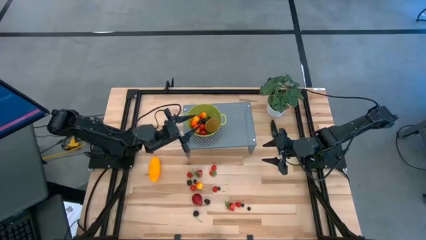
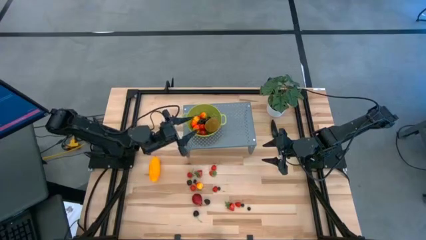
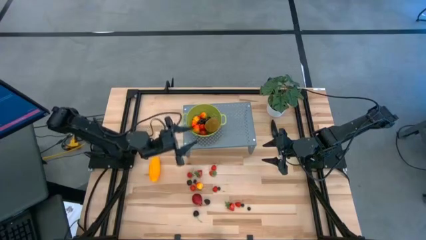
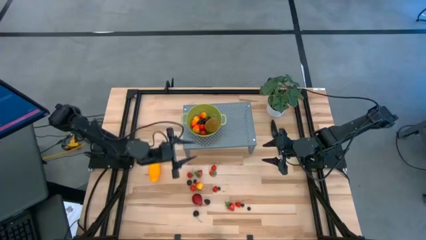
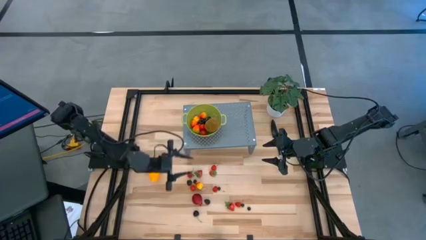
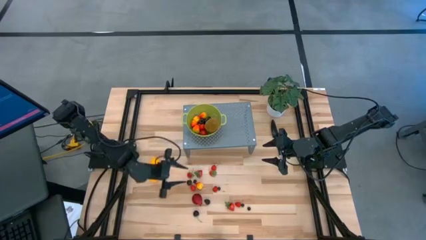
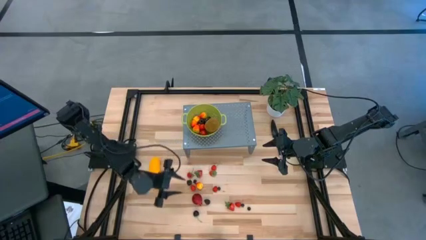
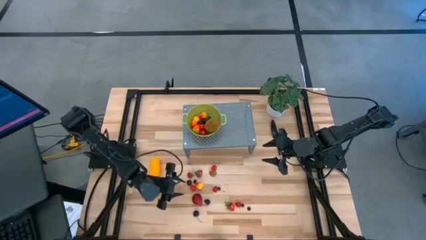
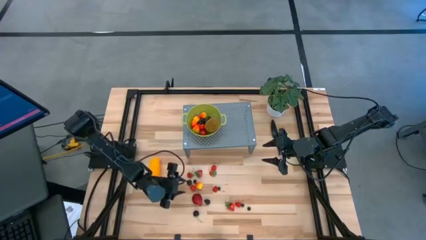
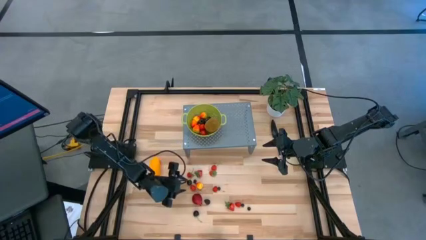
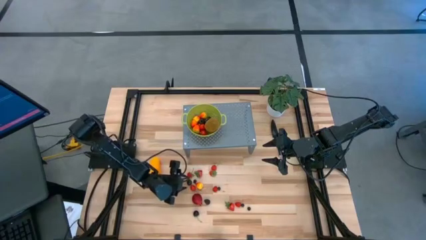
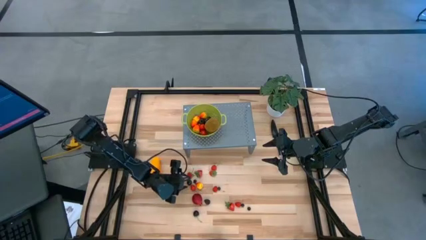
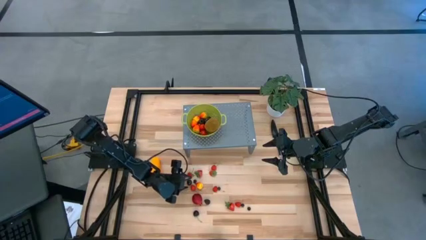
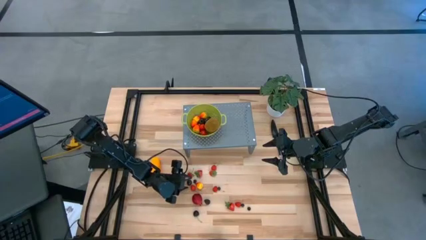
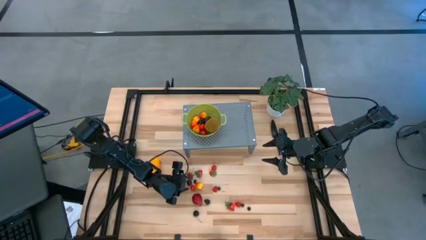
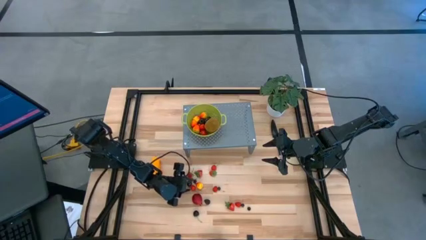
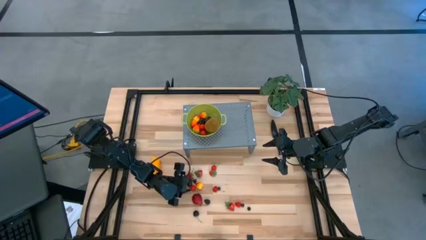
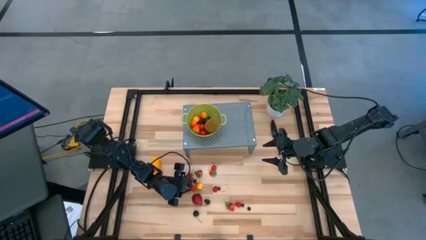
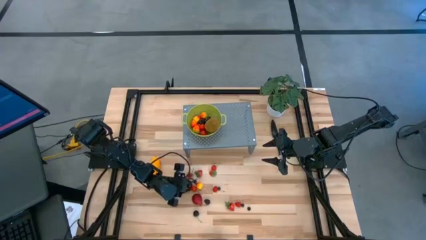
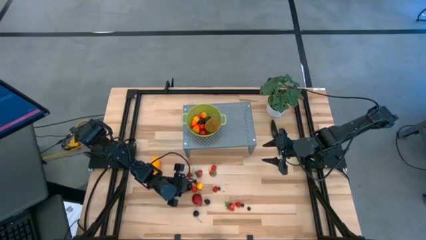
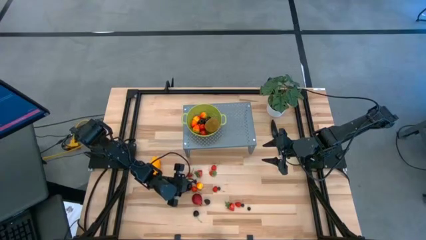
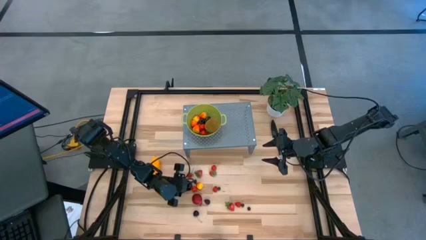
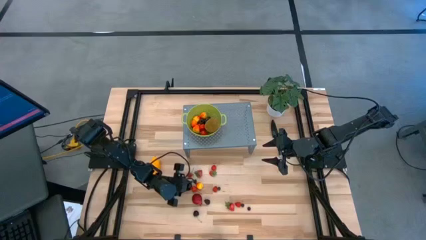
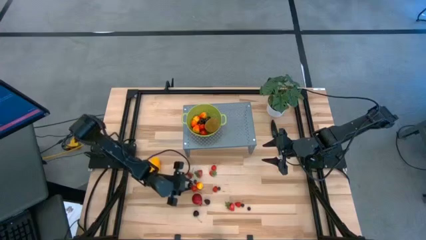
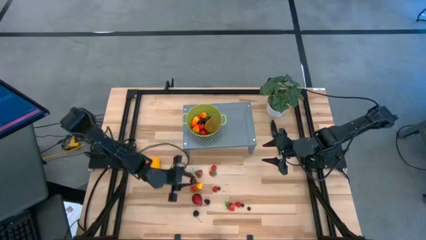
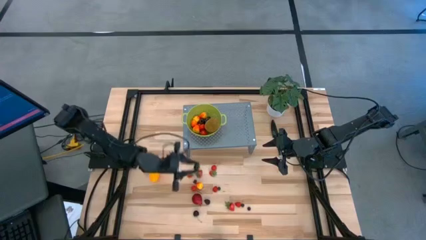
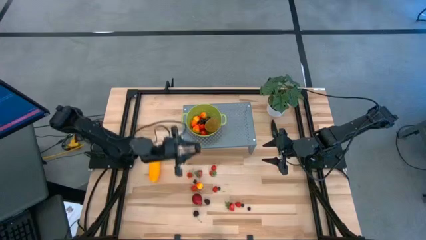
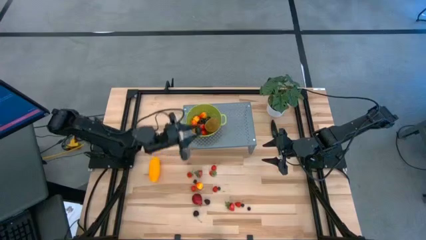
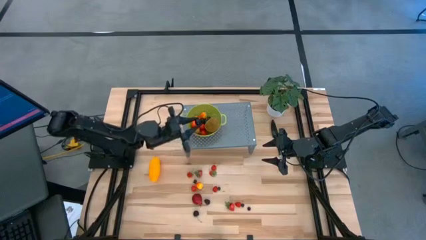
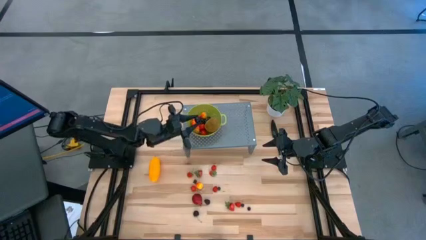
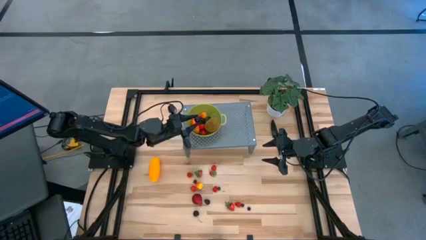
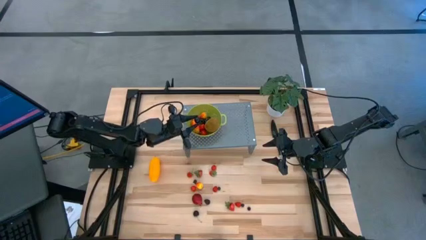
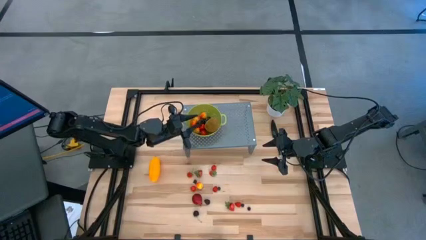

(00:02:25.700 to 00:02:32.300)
Task: Pick & Place Fruit
Put the black cherry into the green strainer bowl on the shelf

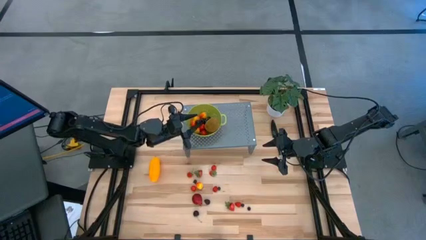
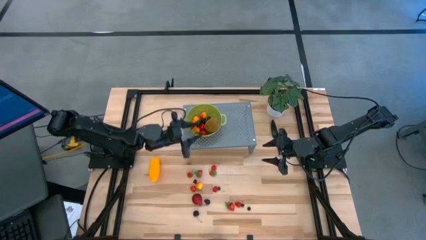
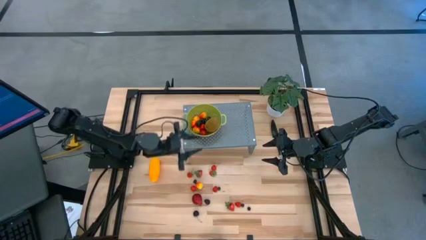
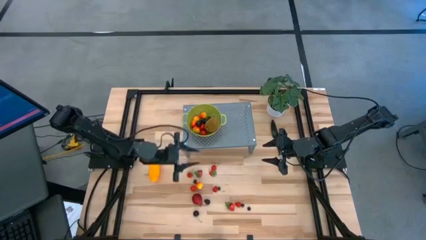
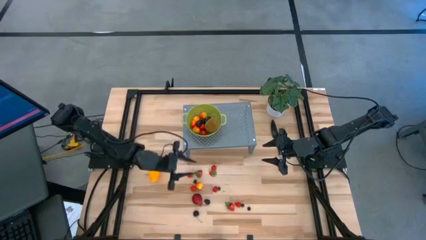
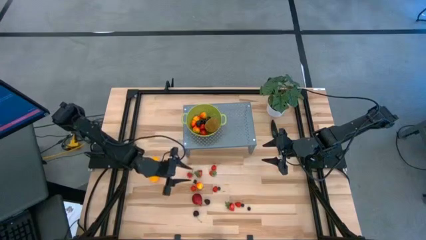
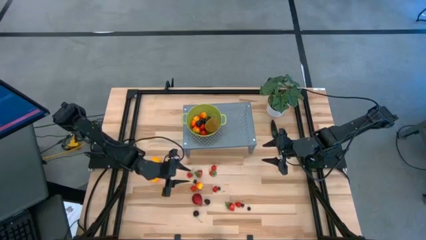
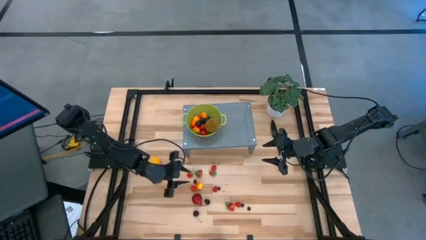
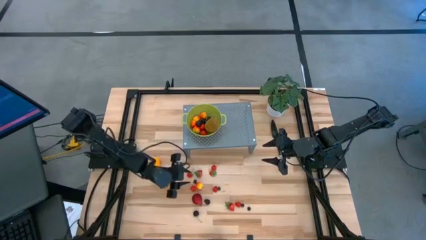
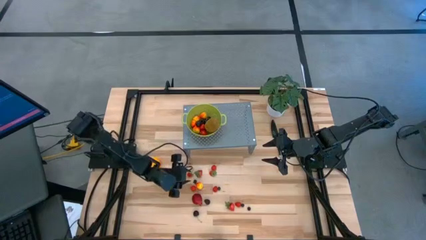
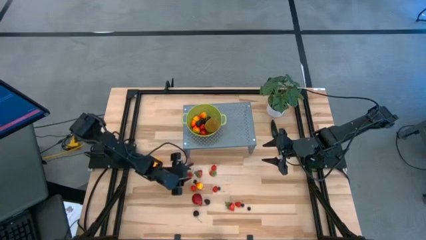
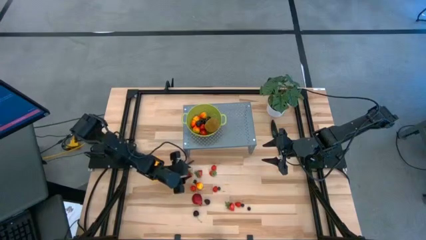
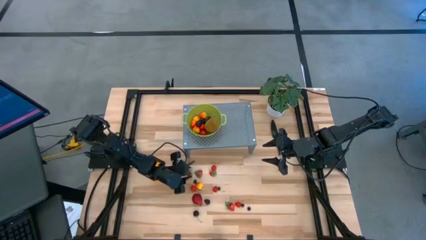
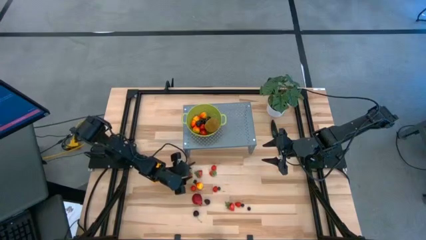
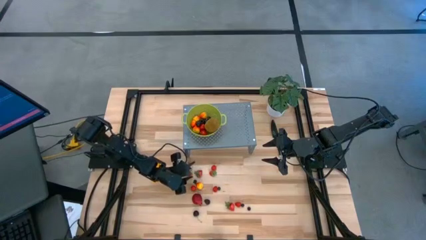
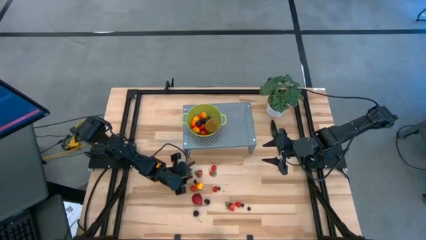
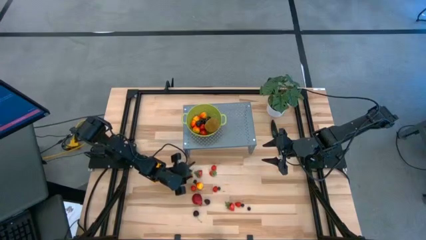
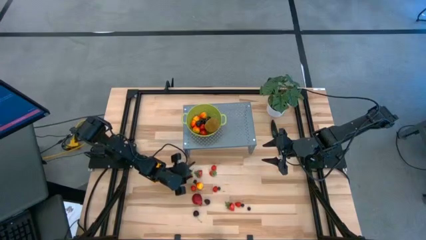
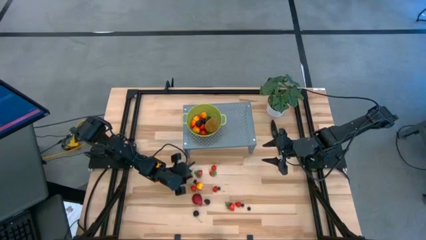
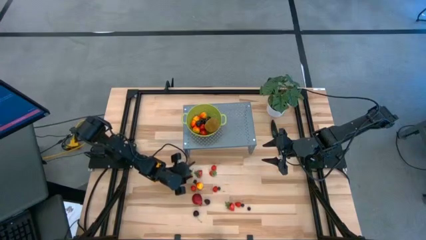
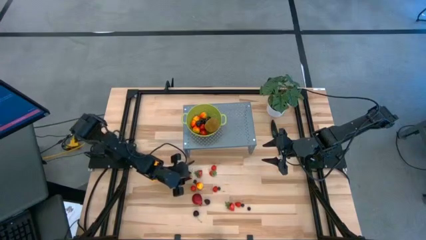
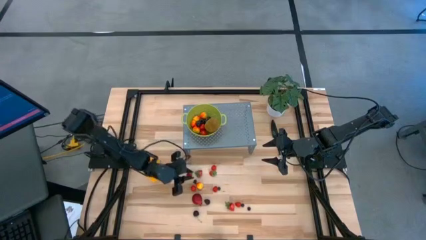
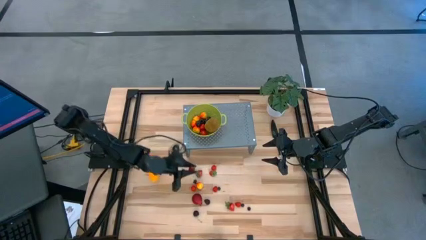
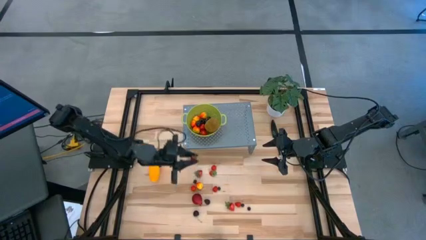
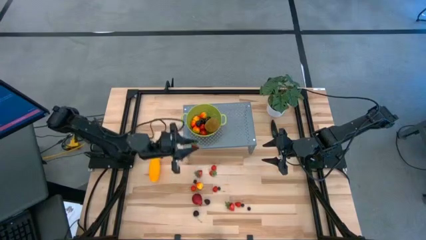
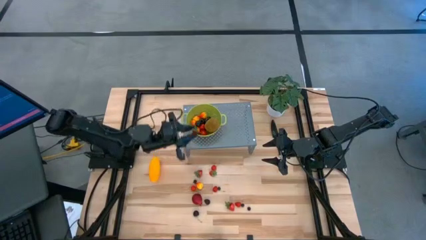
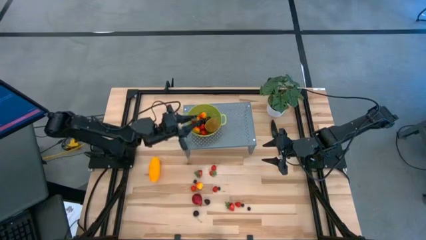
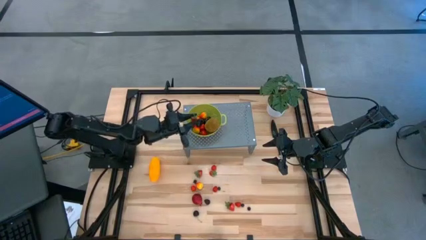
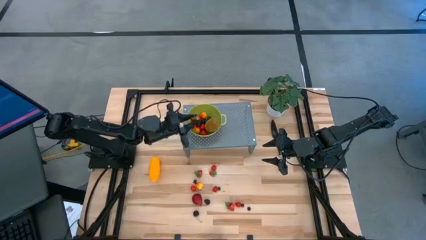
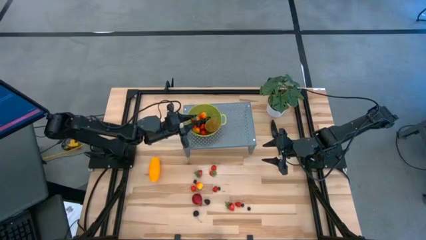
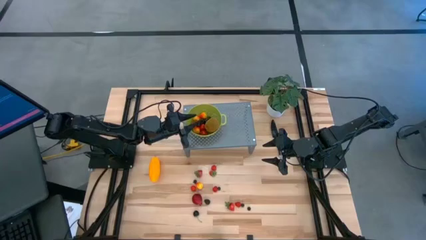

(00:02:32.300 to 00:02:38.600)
Put the strawberry into the green strainer bowl on the shelf

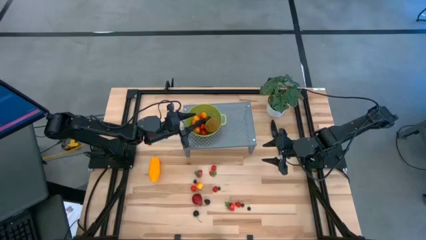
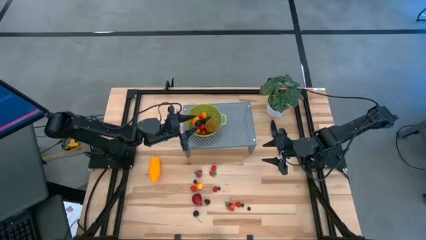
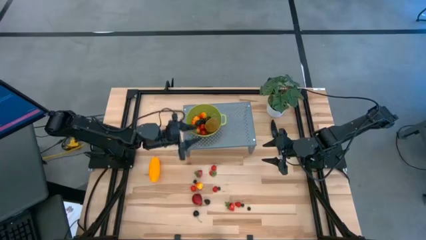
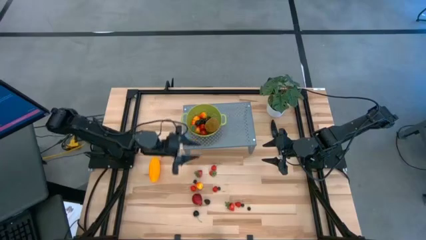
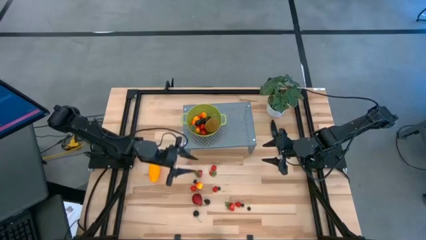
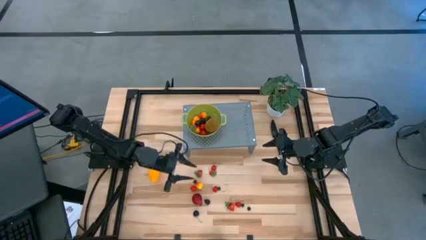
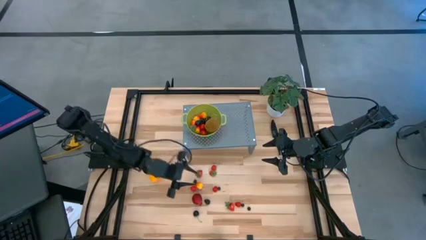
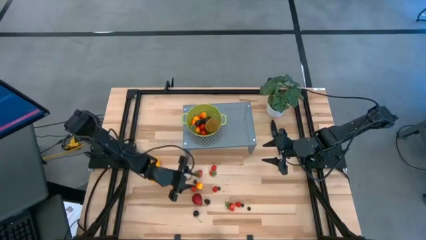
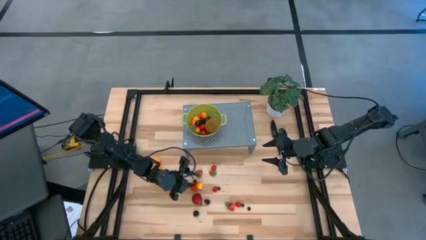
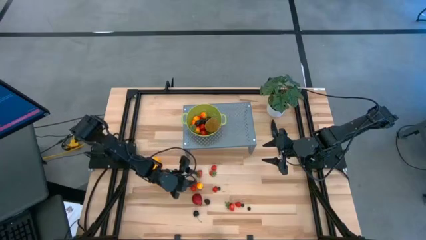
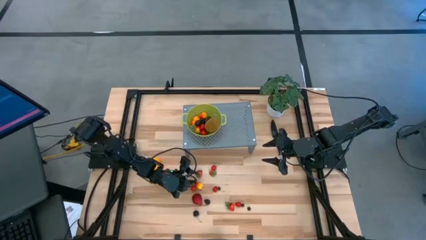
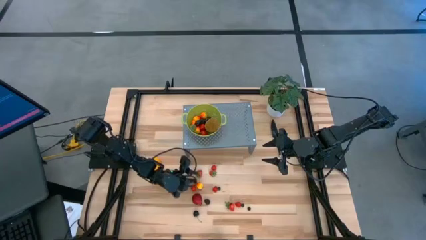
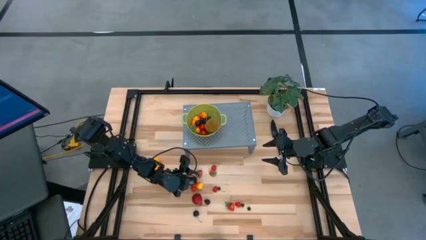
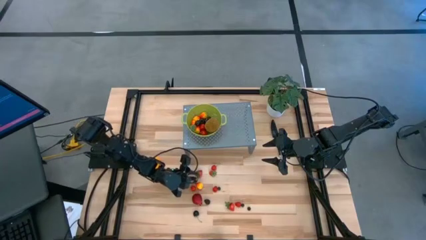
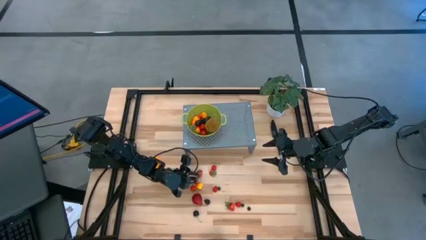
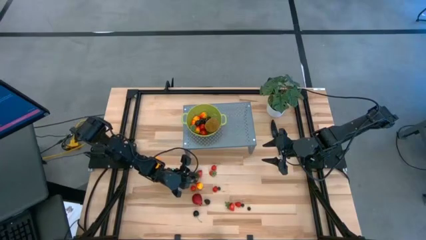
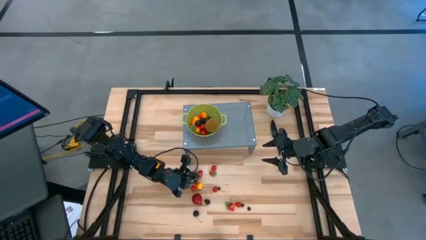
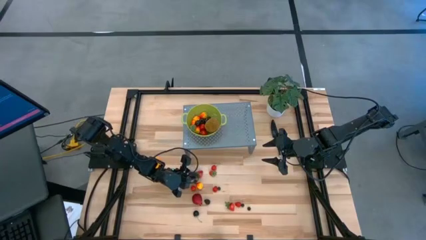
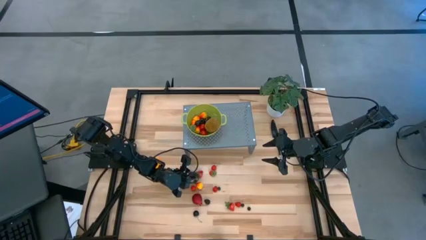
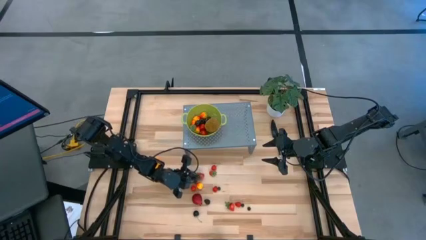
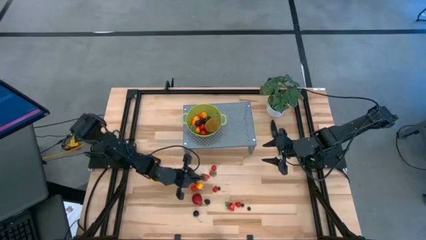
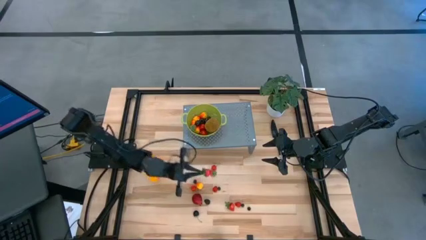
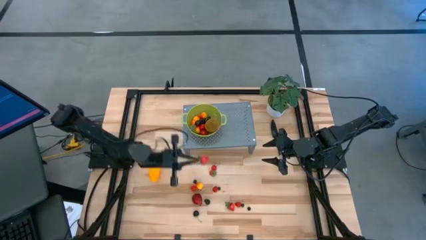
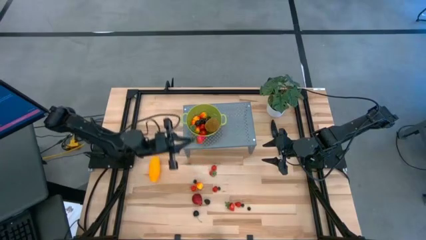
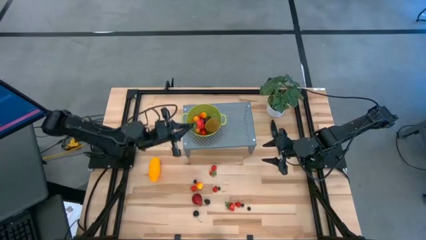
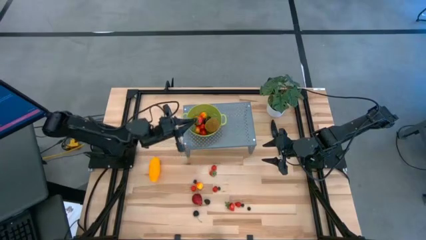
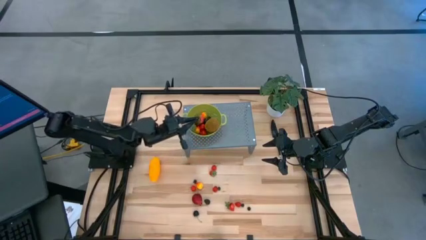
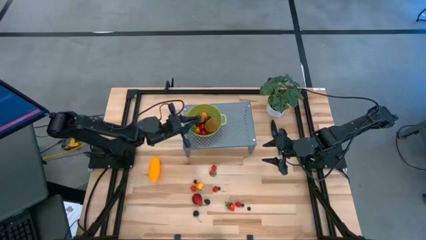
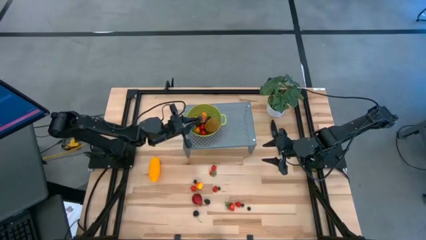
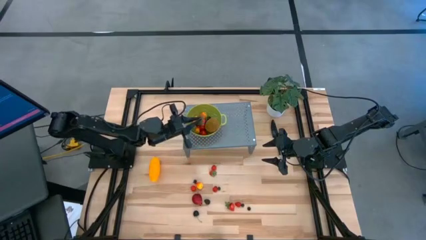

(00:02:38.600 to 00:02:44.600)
Put the strawberry into the green strainer bowl on the shelf
